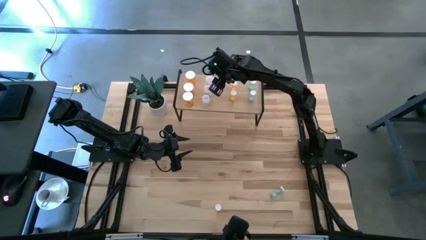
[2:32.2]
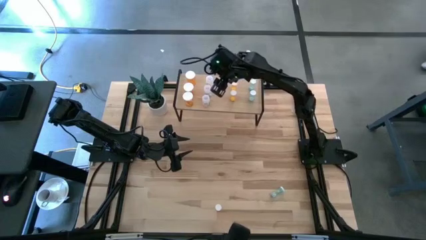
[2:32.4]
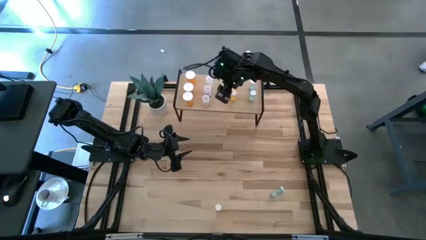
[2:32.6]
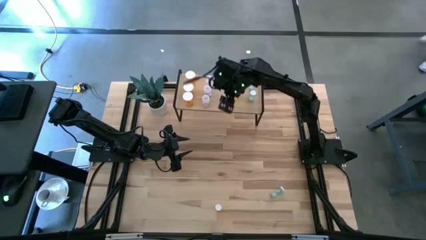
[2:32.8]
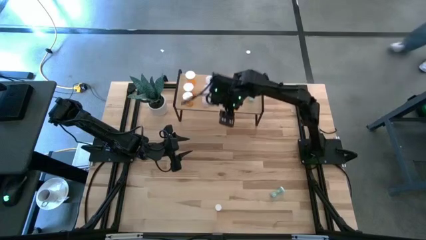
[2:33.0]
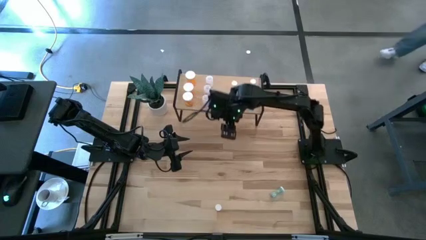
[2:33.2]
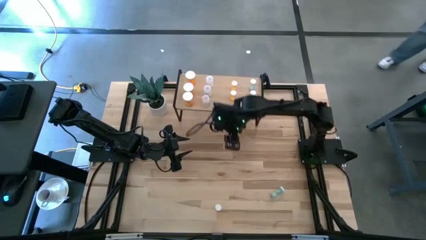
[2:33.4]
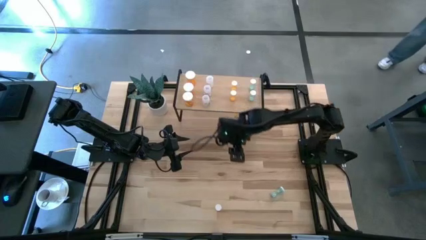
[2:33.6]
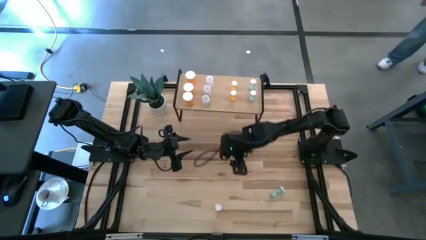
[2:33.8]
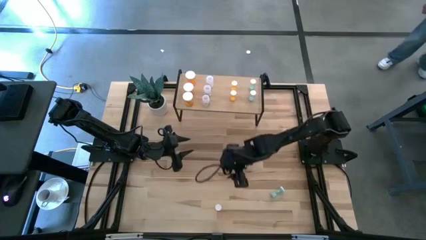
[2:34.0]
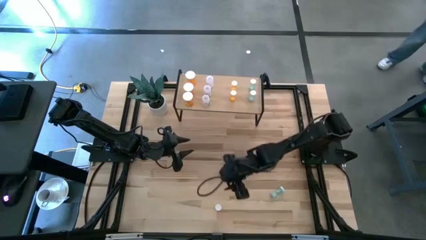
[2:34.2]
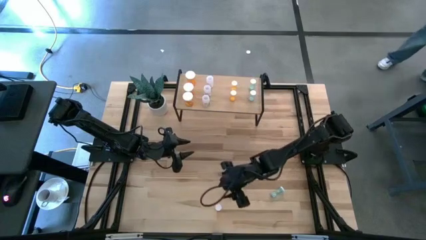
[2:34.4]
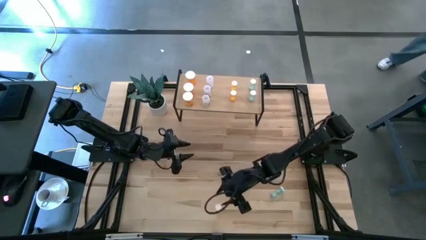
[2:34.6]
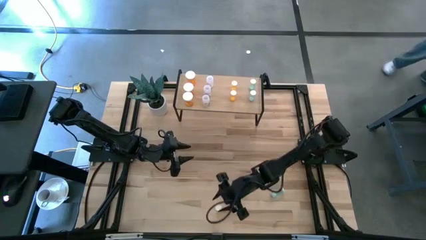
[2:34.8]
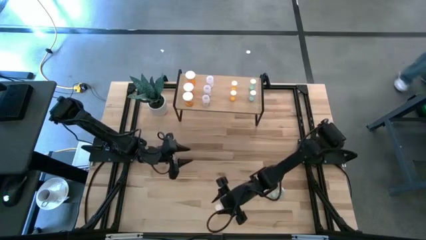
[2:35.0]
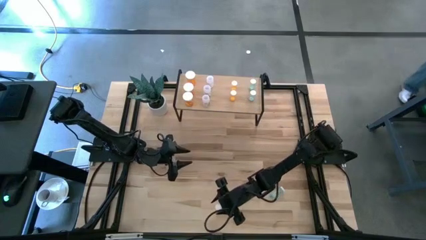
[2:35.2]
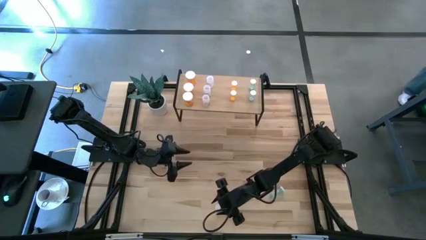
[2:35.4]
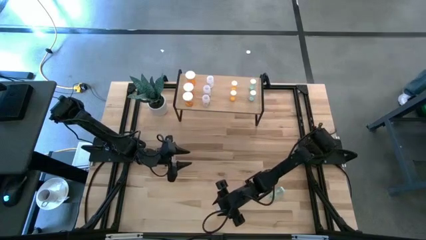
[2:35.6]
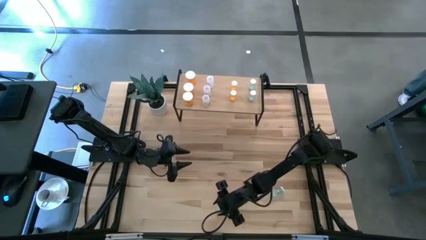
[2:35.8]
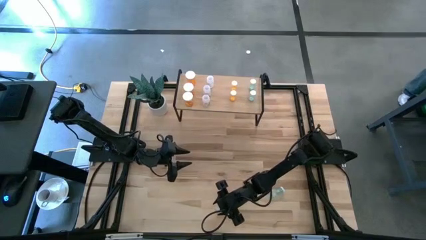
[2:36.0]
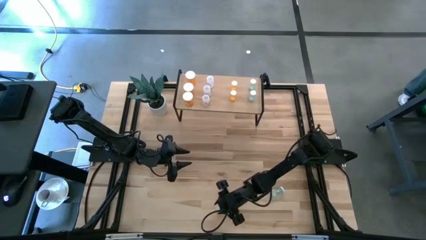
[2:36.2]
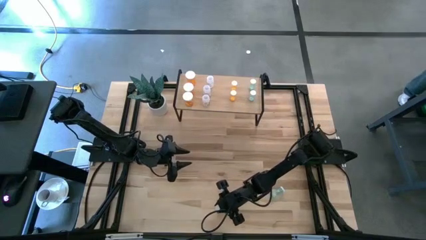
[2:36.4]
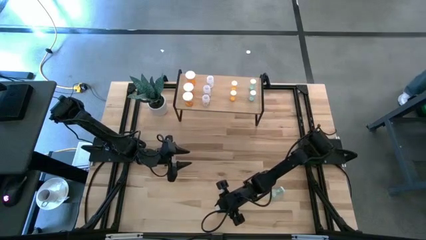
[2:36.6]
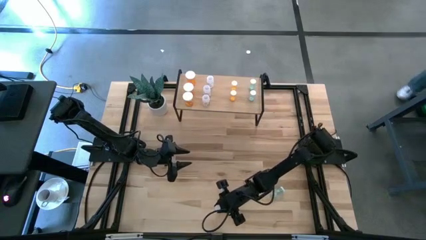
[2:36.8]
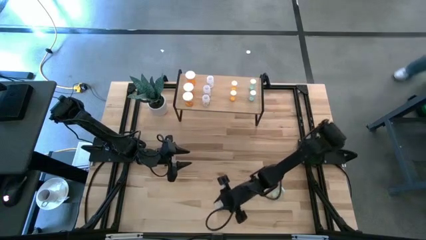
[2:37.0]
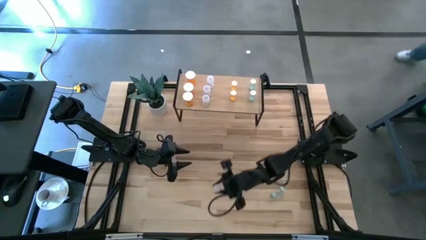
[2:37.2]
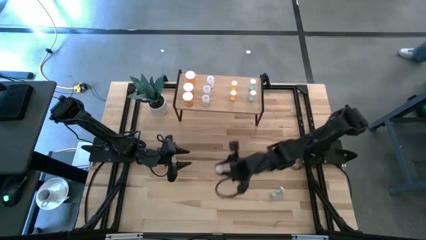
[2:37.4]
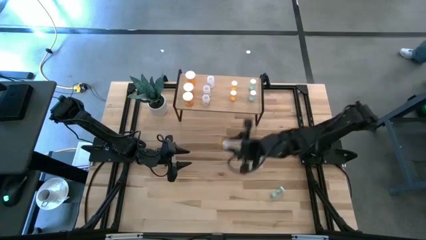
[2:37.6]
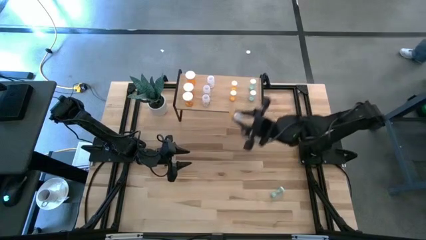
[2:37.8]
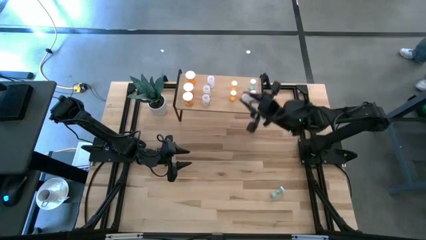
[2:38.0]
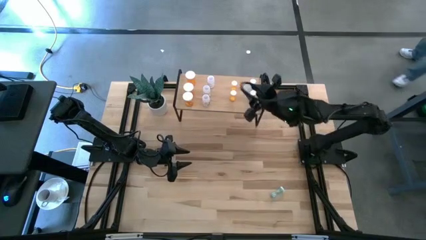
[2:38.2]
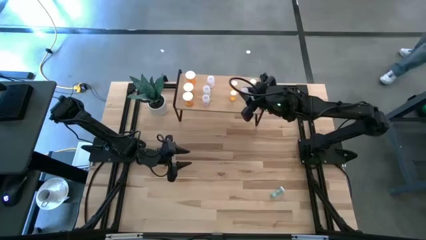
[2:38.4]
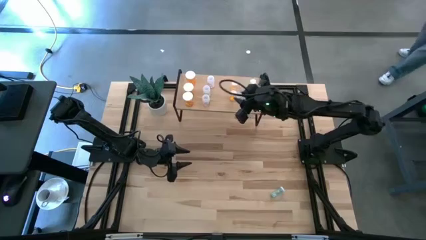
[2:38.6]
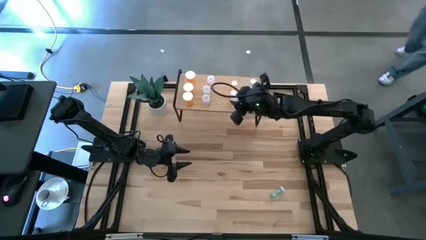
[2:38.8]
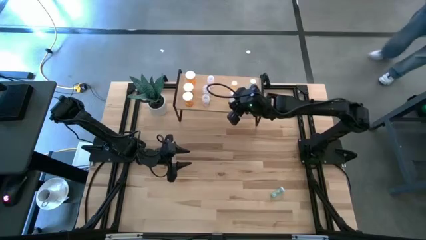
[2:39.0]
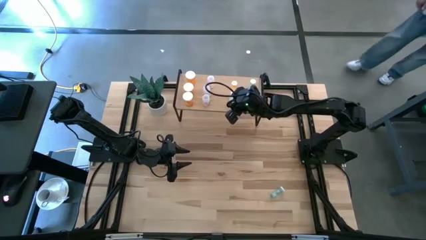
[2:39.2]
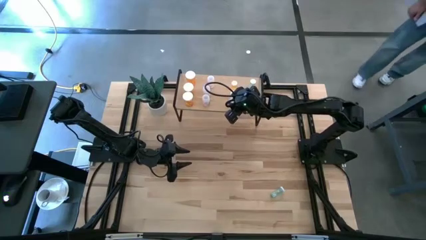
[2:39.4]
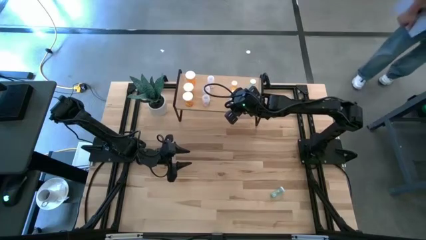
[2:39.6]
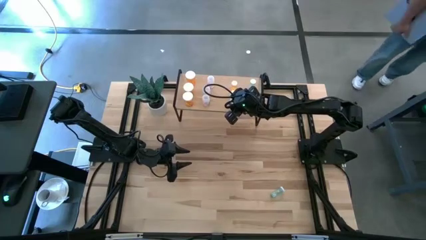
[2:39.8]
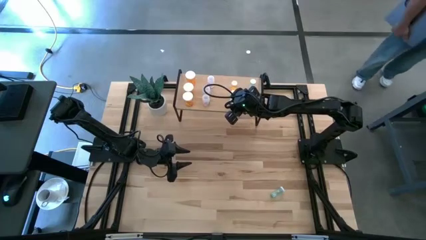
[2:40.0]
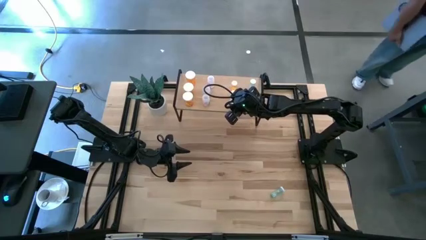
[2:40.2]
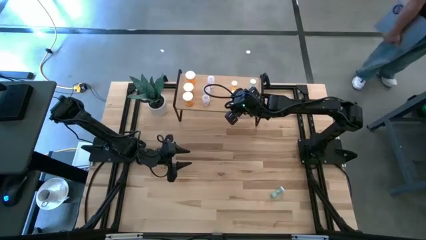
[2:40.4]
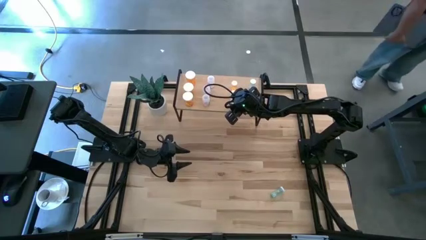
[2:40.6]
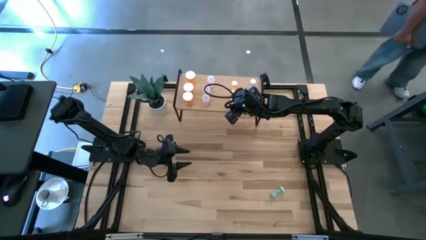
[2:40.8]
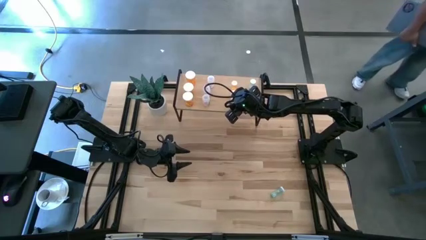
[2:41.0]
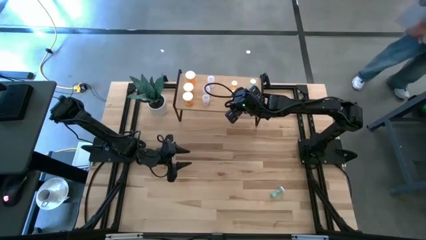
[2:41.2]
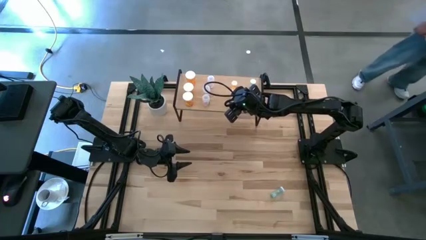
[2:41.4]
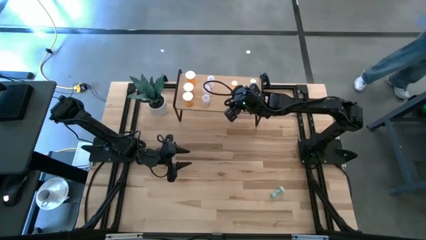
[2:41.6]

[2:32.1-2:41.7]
Task: Pick and place medicine bottles onto shelf by color
Put the small orange pill bottle aligned with the other small orange pill bottles on the shelf
